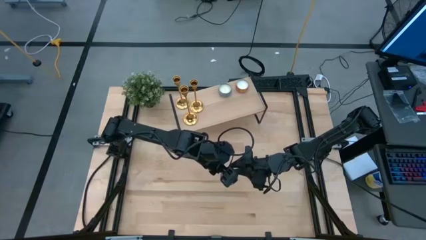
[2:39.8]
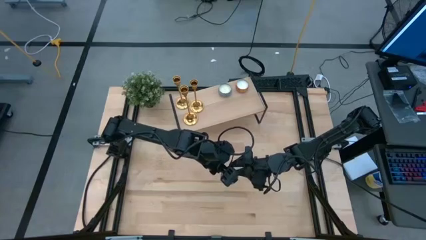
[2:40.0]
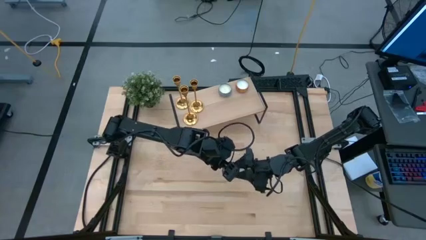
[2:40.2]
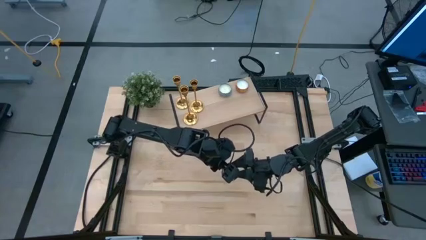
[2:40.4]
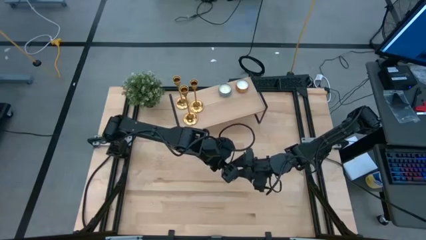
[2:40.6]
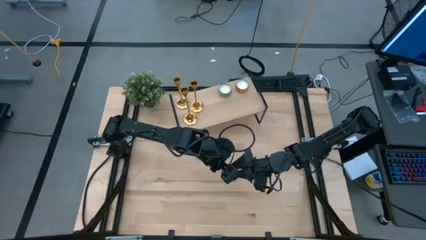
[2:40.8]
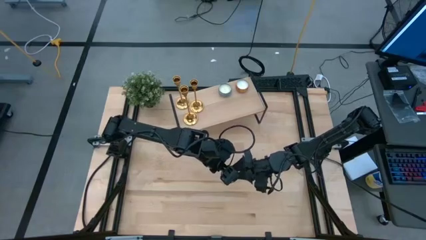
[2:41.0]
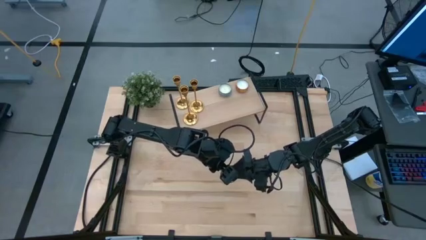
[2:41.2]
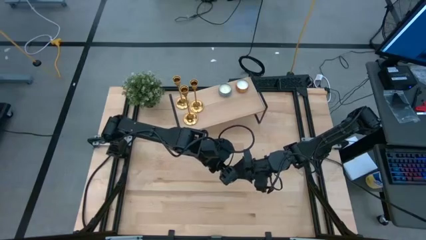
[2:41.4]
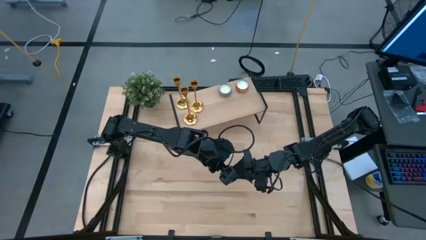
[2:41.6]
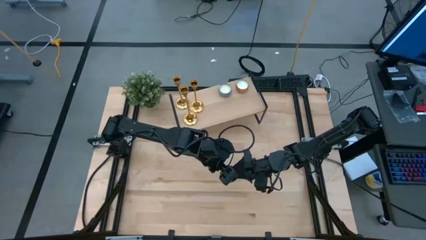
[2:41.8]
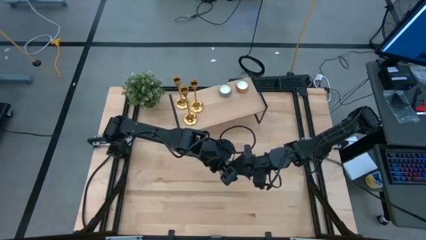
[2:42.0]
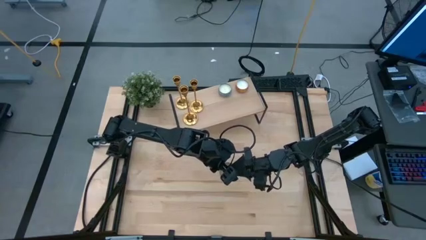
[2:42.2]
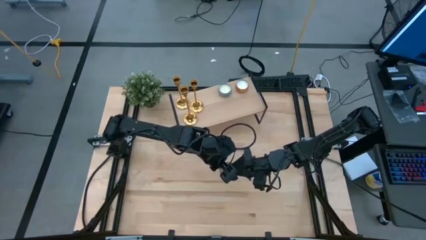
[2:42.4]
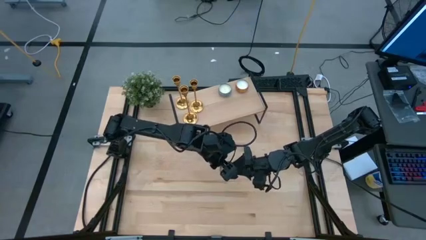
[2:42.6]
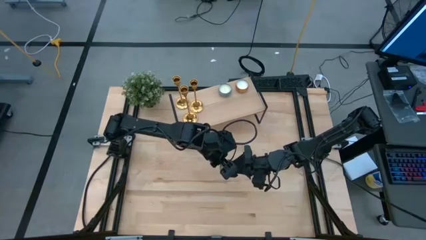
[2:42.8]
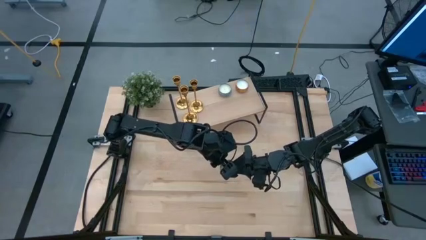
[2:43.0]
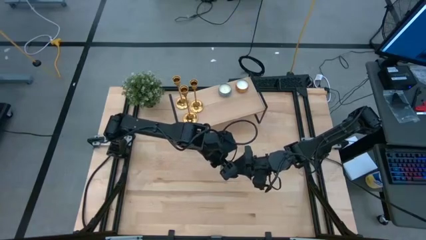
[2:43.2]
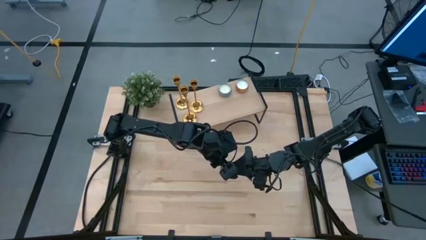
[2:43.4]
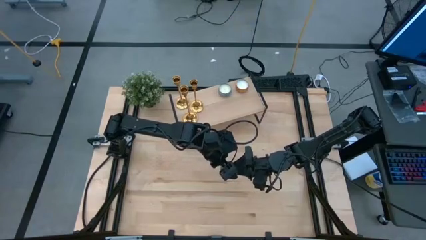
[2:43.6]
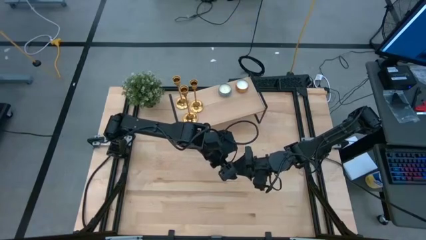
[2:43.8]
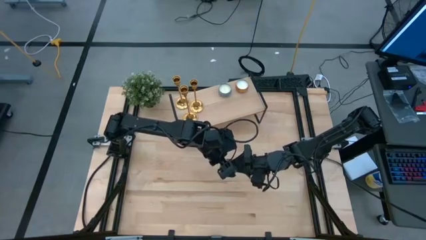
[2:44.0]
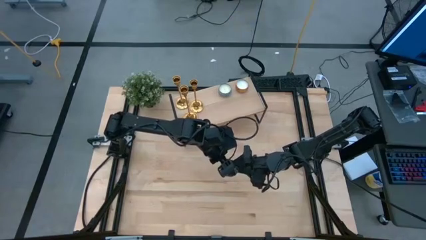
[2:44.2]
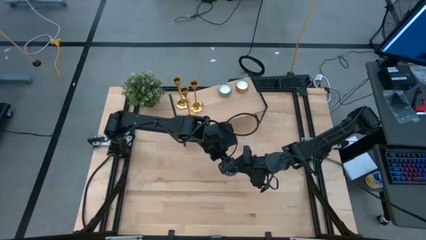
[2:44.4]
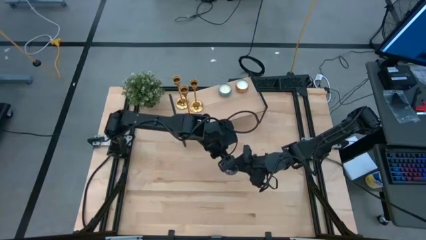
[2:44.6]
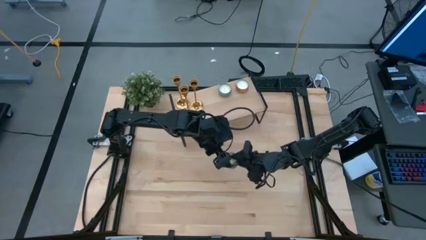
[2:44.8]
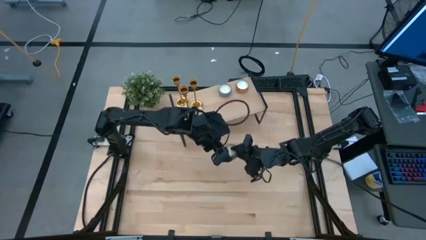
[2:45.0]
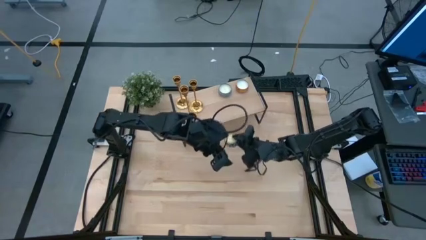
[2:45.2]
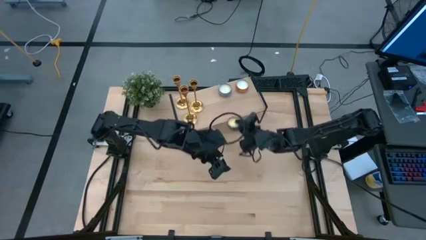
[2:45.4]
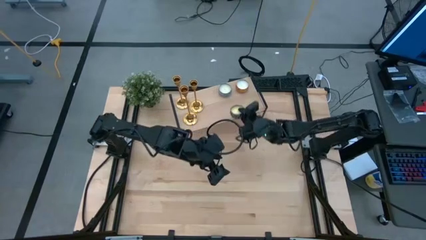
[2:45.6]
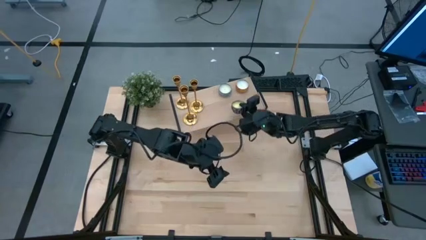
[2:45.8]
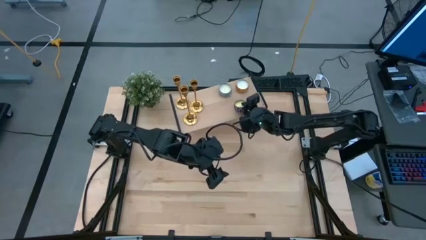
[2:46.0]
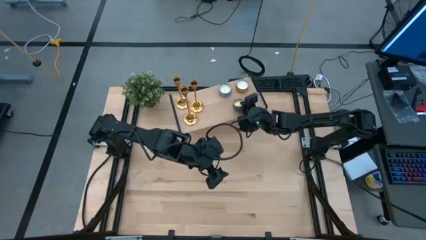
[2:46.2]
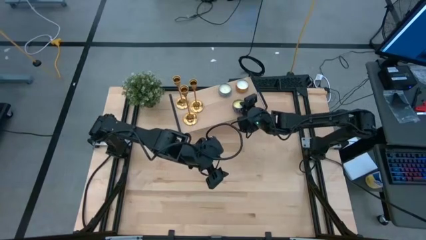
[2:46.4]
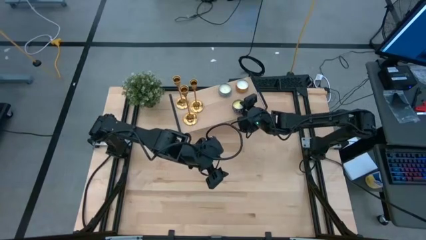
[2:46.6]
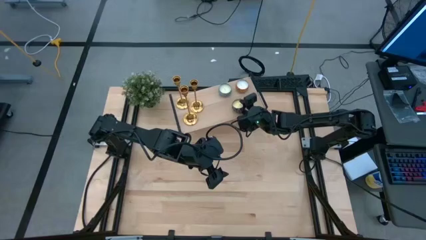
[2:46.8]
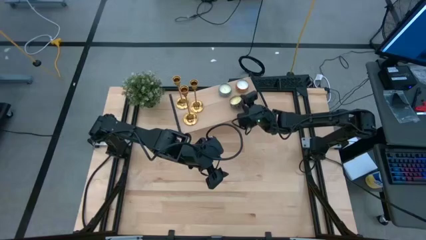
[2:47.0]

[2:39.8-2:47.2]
Task: Pick & Place candle stick holders
Put the black scented candle on the shelf

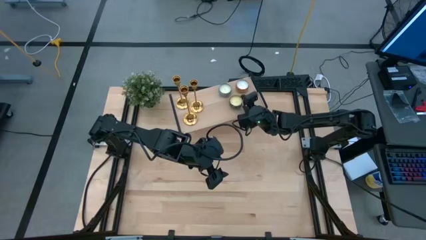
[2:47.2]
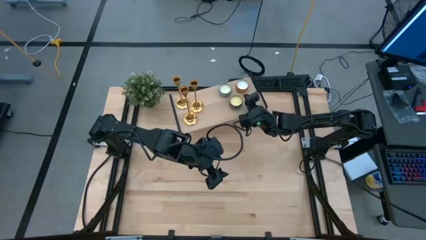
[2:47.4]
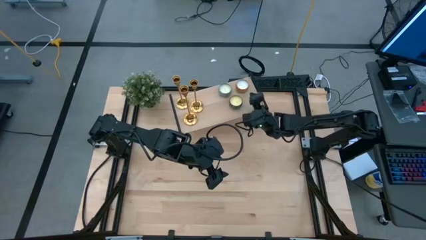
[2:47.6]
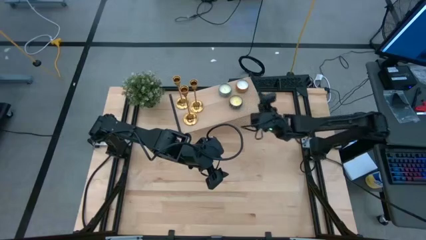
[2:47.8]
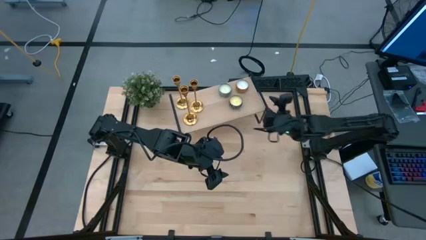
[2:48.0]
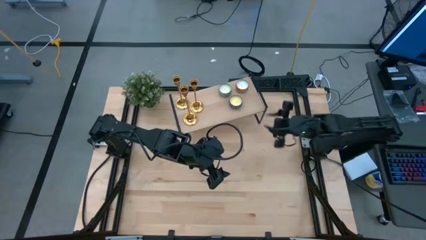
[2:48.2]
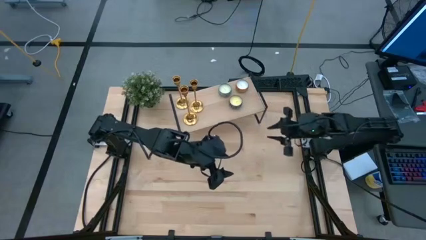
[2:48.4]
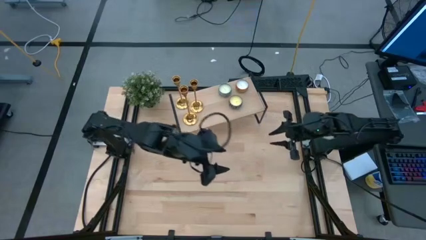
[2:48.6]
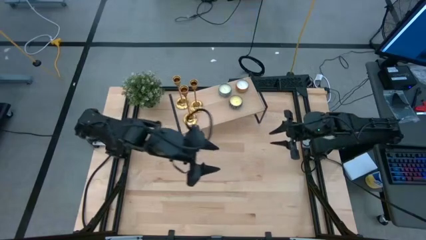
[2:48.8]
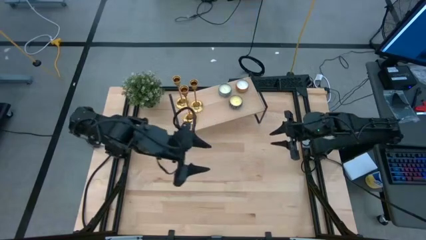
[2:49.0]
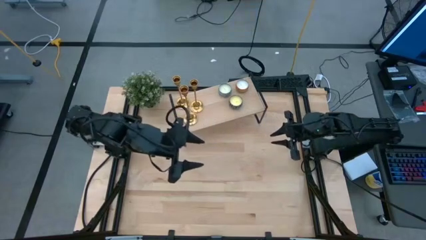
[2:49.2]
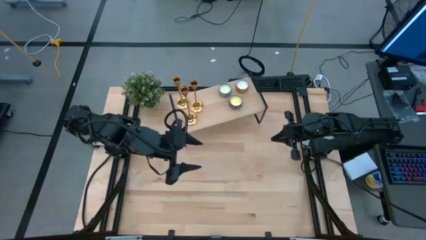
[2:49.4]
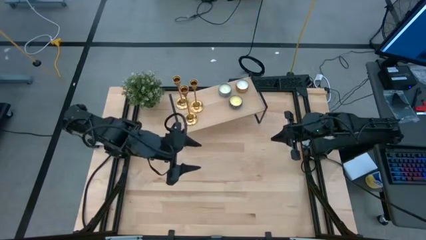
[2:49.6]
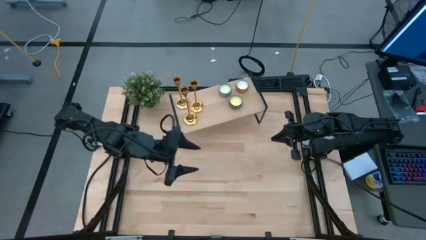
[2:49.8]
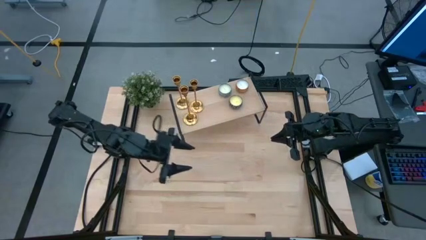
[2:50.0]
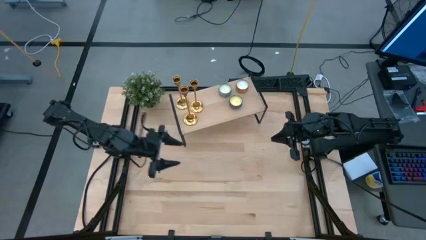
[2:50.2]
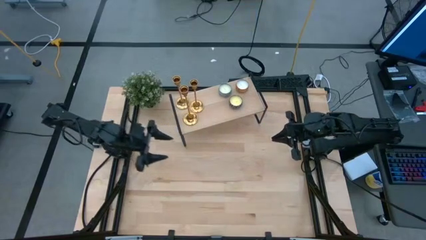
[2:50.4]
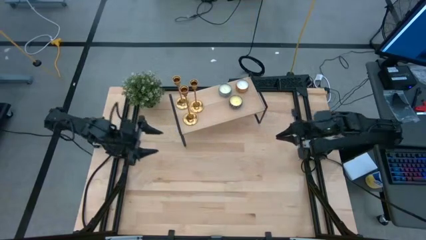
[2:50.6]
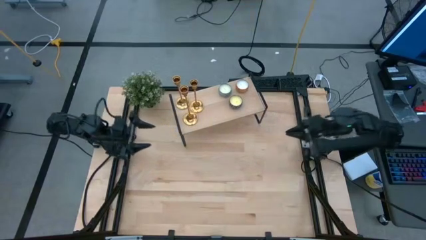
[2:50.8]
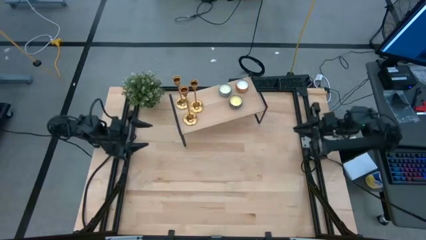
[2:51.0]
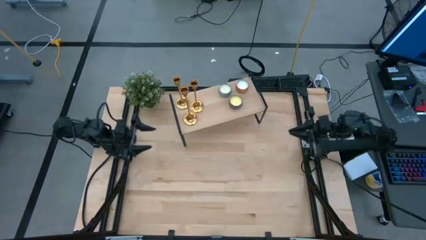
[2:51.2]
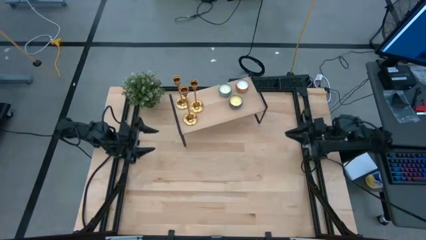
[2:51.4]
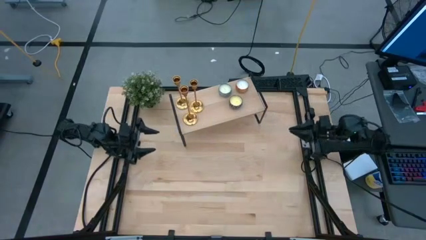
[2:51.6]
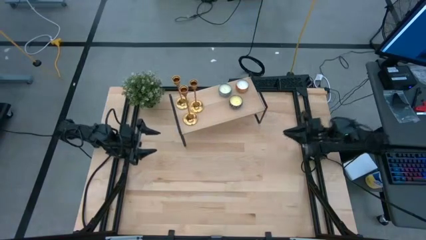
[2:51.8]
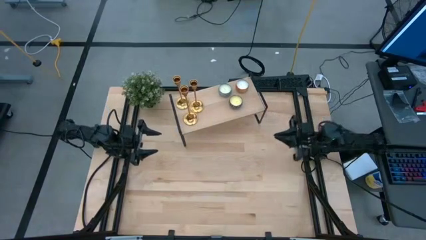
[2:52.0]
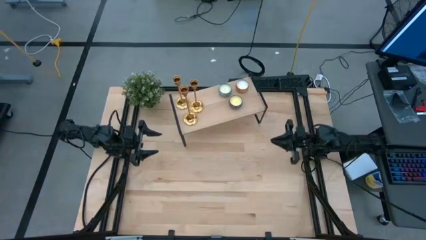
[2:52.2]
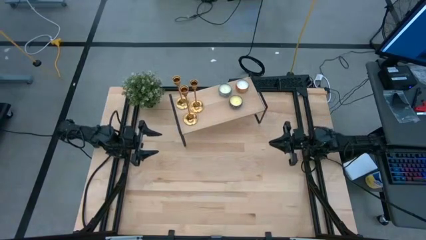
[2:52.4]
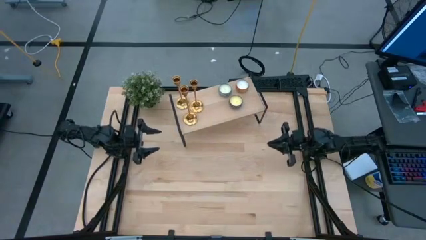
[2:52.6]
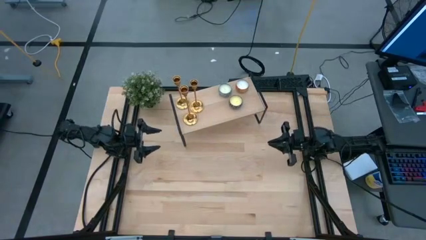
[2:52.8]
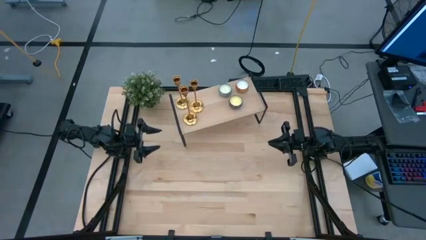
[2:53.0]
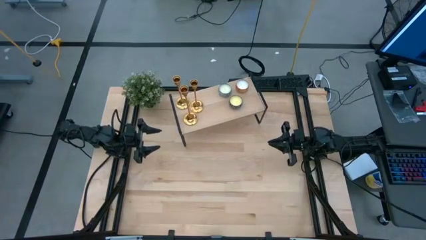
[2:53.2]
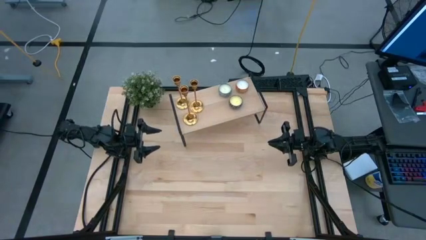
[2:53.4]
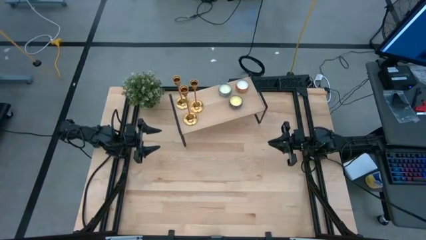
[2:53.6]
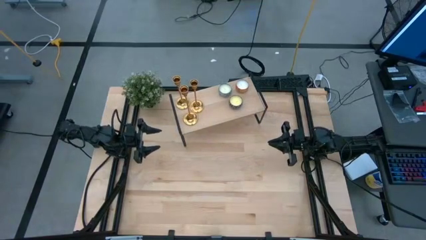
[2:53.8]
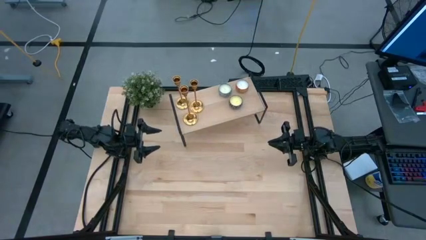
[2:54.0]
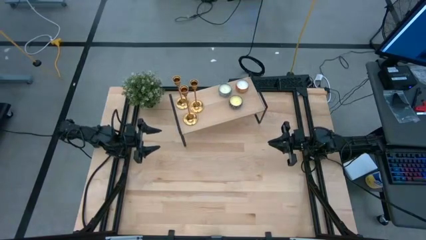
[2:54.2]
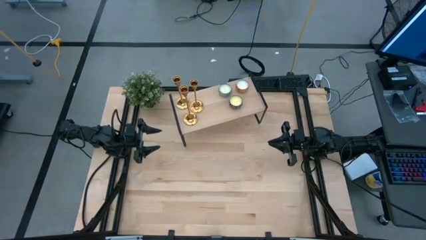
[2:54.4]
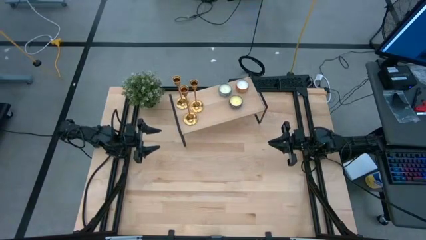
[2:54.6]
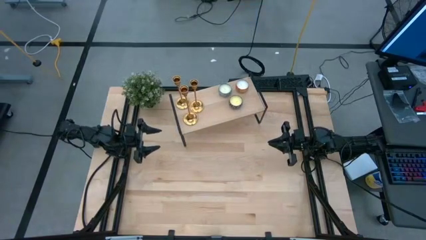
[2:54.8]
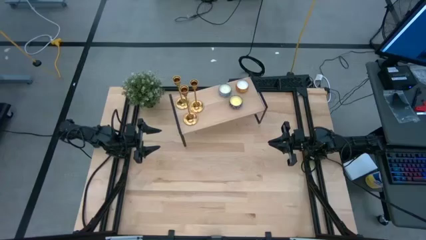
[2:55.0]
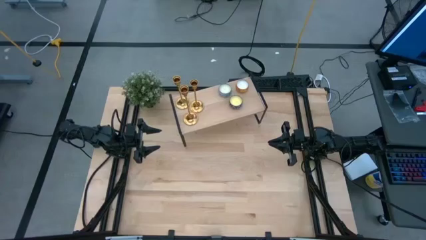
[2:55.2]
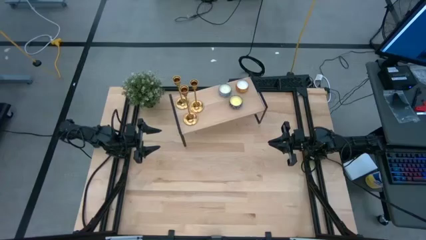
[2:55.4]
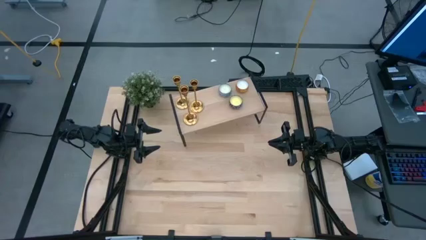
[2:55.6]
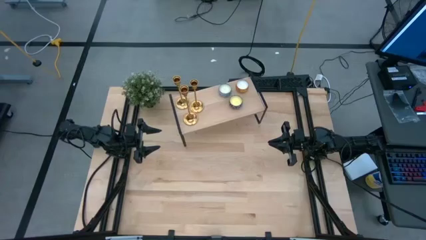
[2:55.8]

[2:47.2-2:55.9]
Return to Home Position
